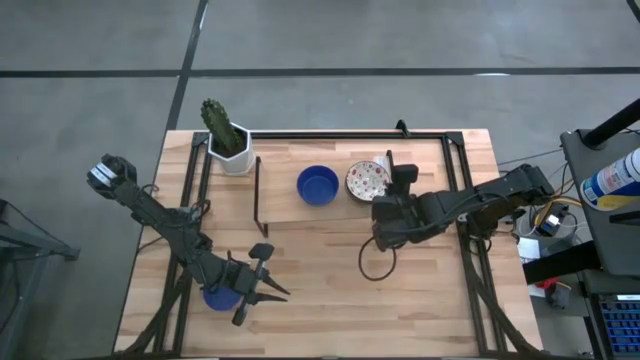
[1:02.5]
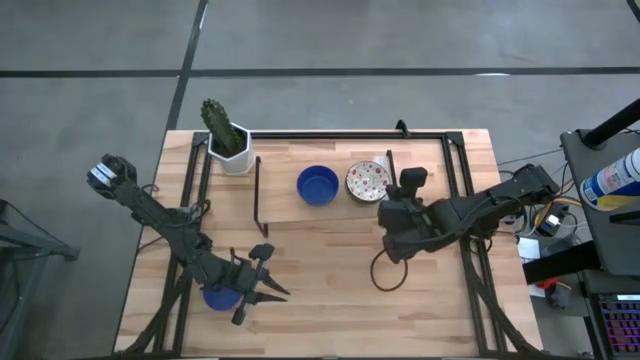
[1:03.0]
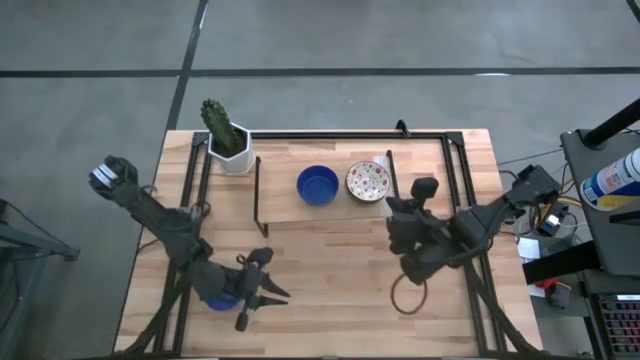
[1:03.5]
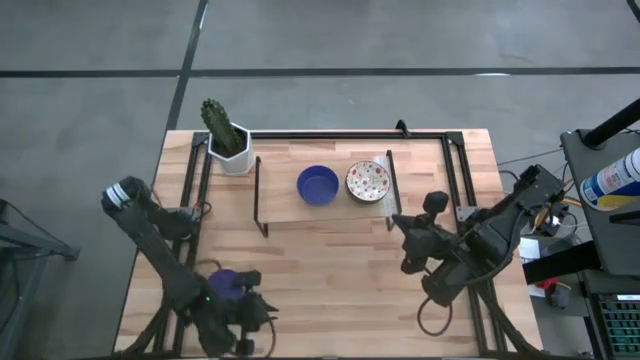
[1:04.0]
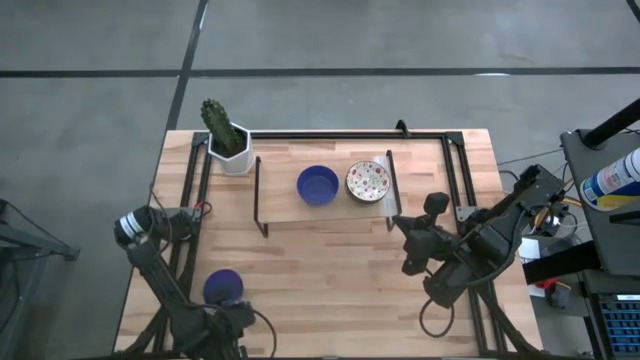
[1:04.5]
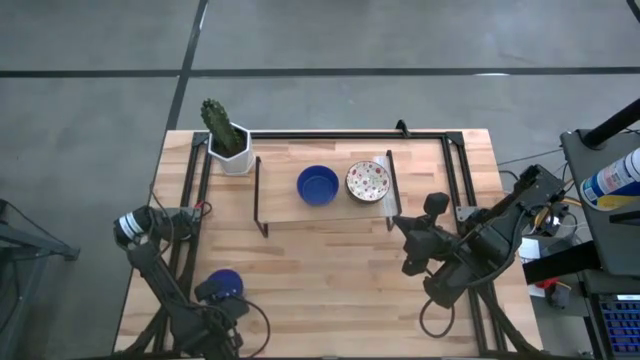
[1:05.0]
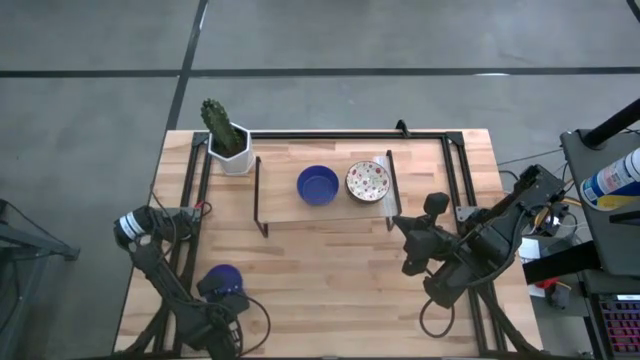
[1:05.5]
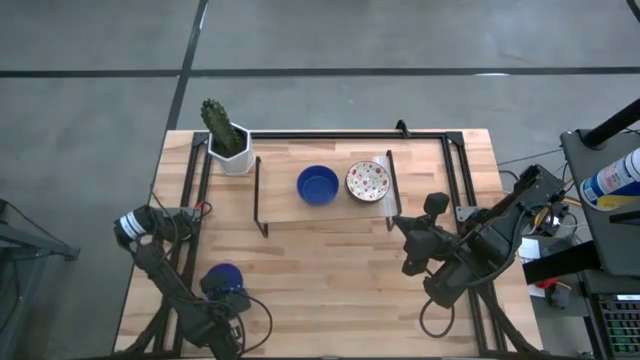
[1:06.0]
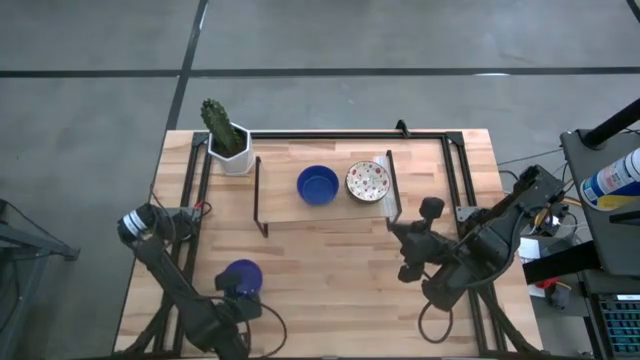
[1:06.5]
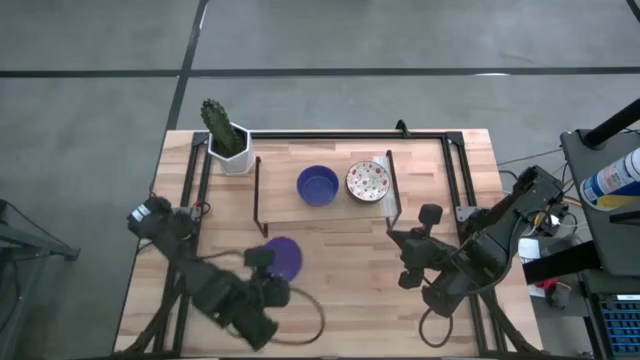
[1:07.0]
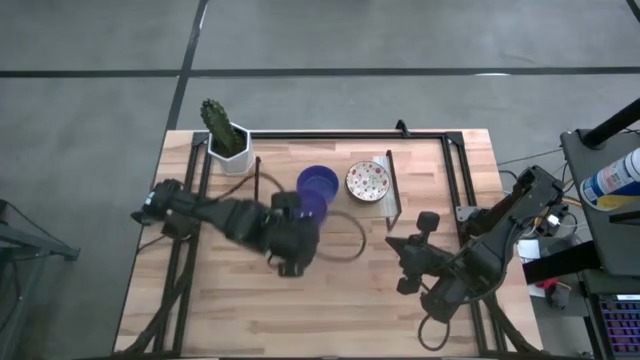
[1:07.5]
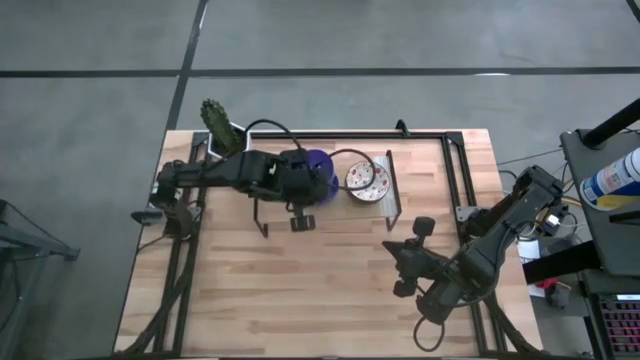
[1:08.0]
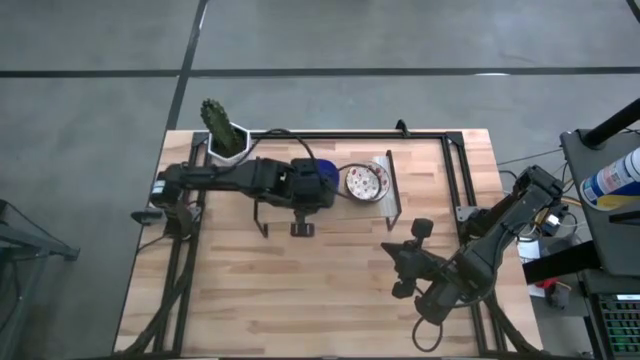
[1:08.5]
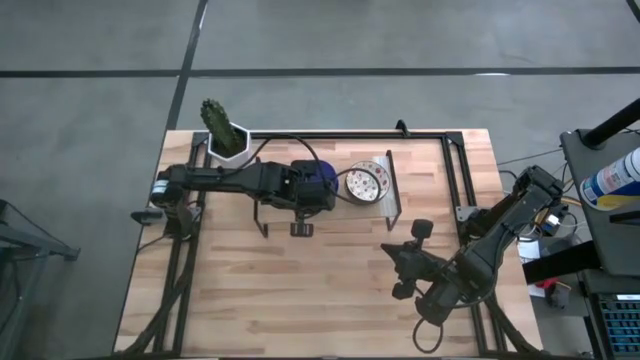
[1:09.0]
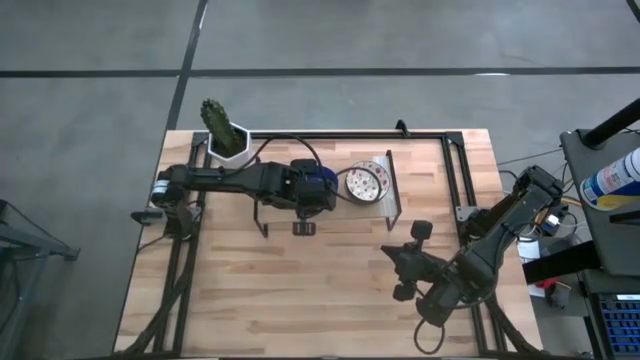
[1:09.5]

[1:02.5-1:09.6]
Task: Pick & Place Mini bowls
Stack the blue bowl on the stacked blue bowl on the shelf

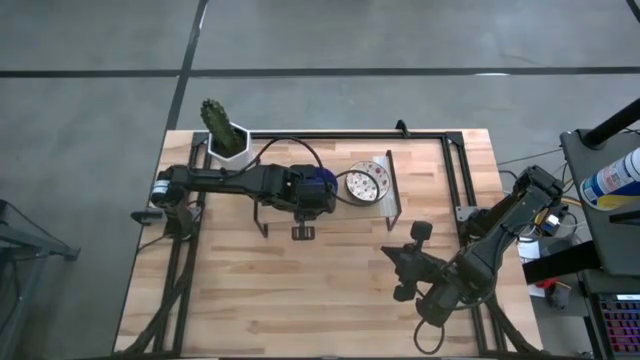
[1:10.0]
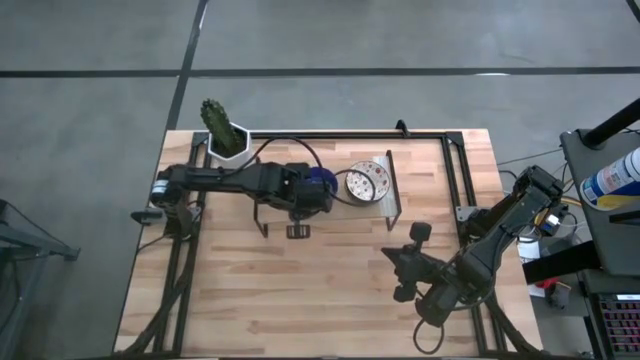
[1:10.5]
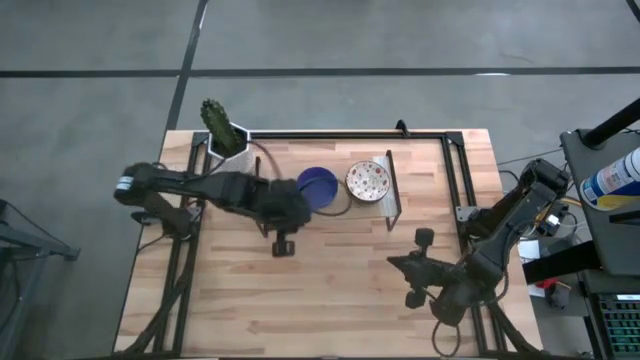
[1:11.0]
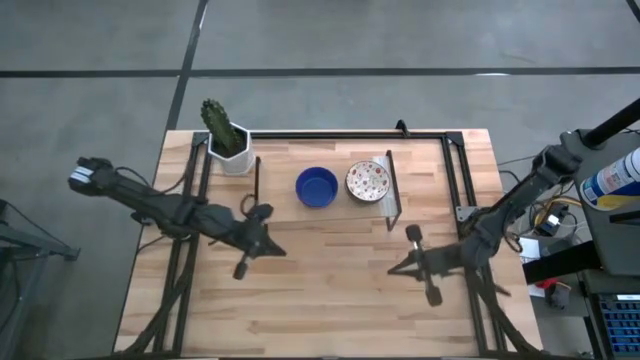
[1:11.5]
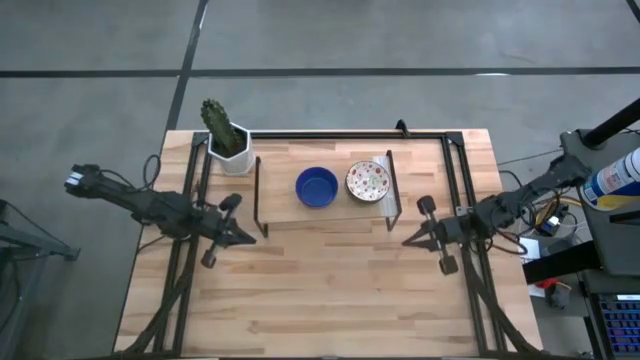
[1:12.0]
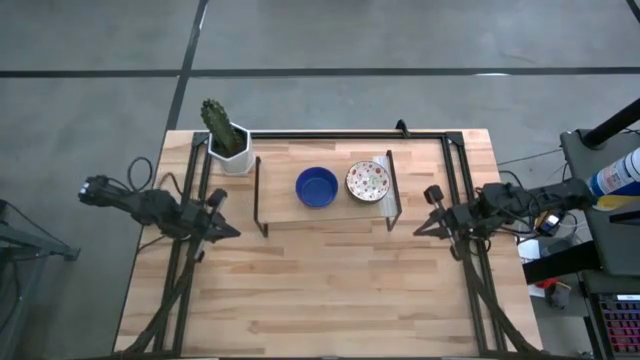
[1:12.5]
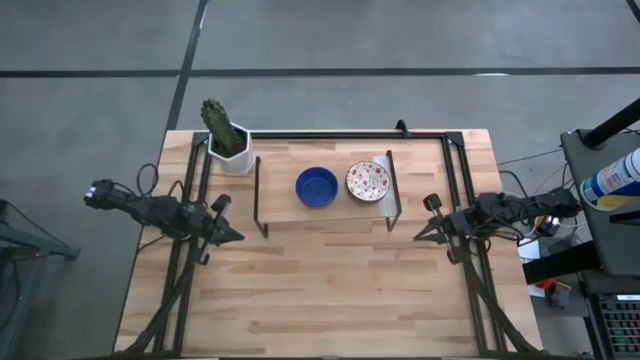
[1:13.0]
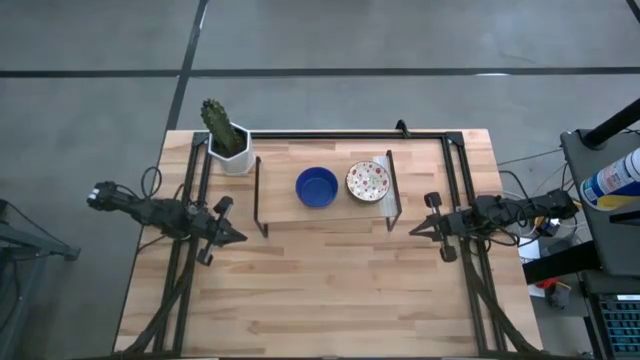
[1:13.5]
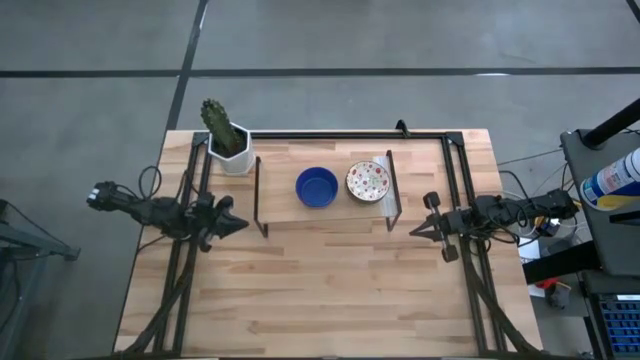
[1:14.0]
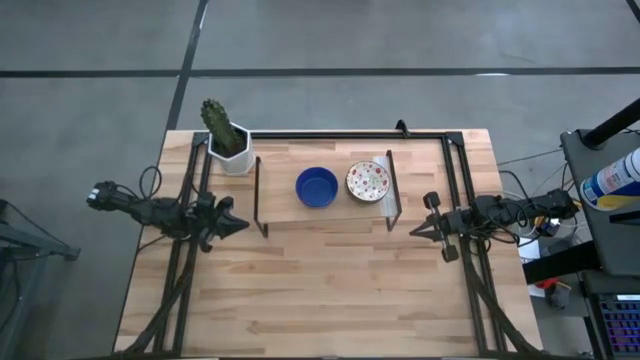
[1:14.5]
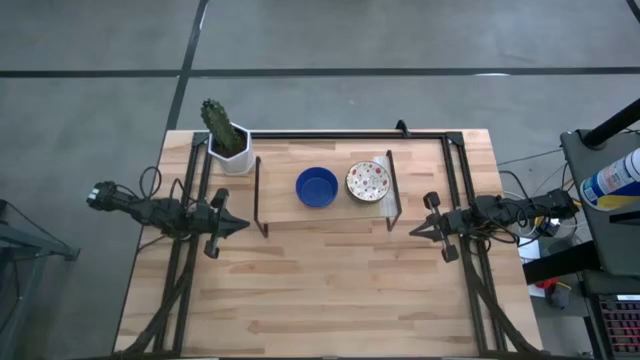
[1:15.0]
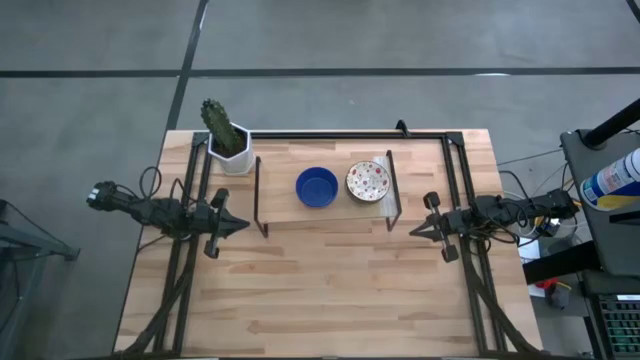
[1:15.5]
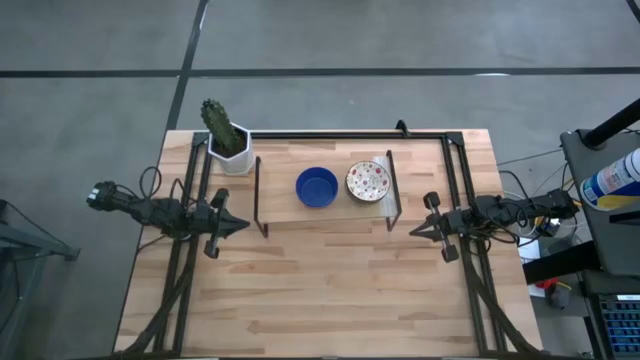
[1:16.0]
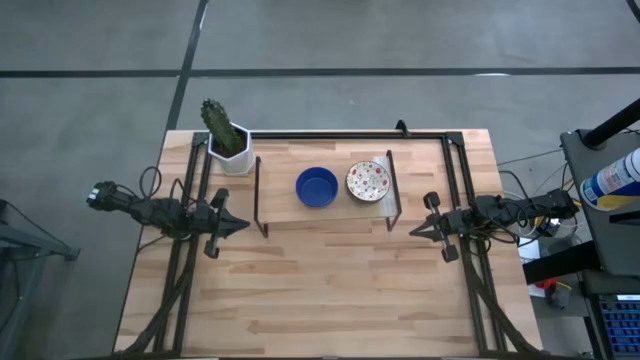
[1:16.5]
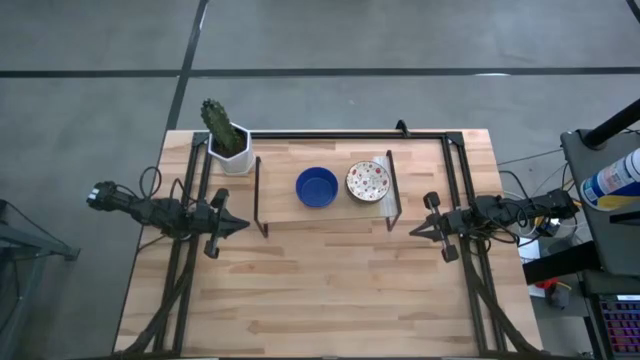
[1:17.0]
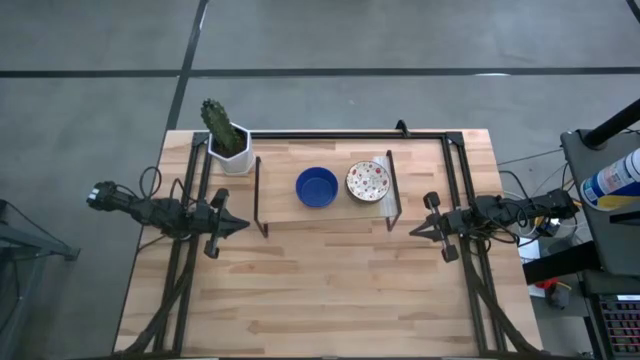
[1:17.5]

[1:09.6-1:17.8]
Return to Home Position

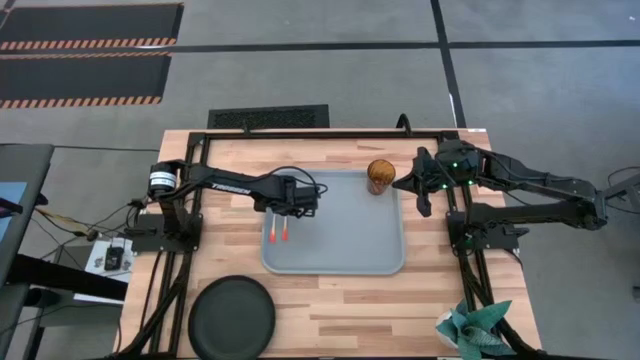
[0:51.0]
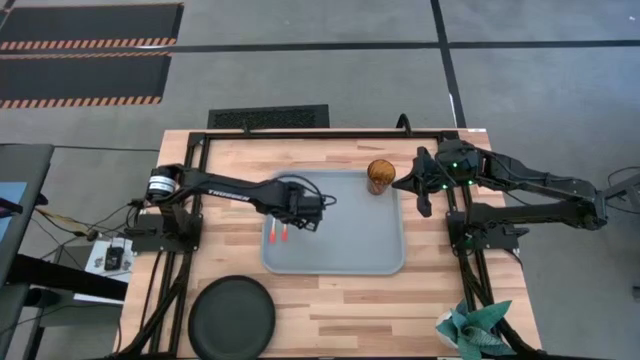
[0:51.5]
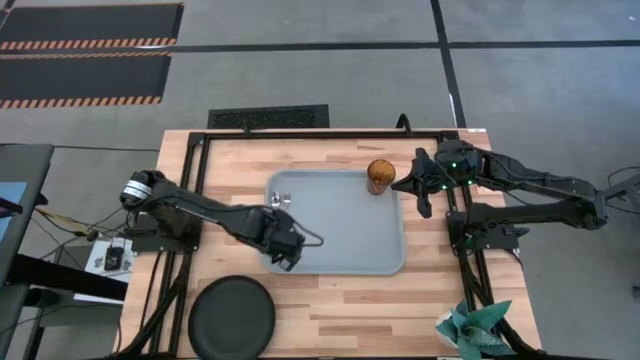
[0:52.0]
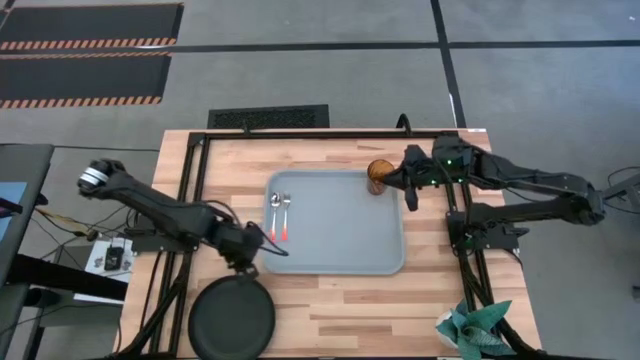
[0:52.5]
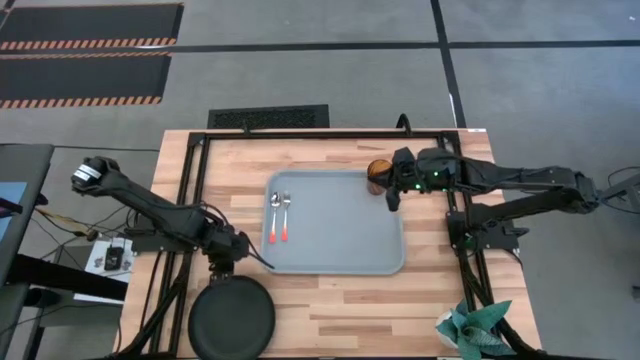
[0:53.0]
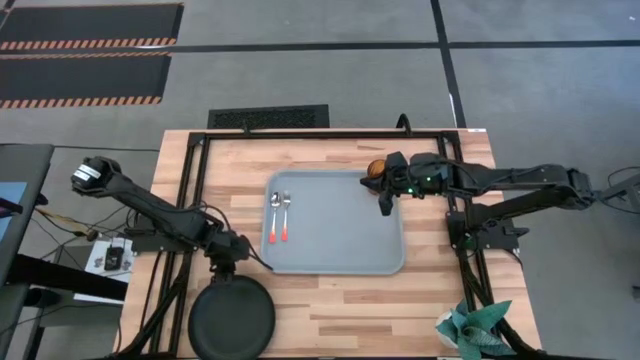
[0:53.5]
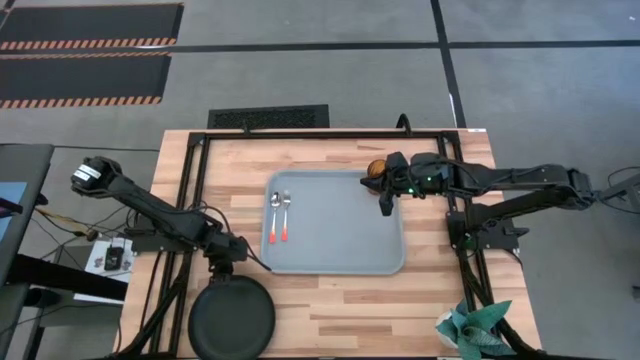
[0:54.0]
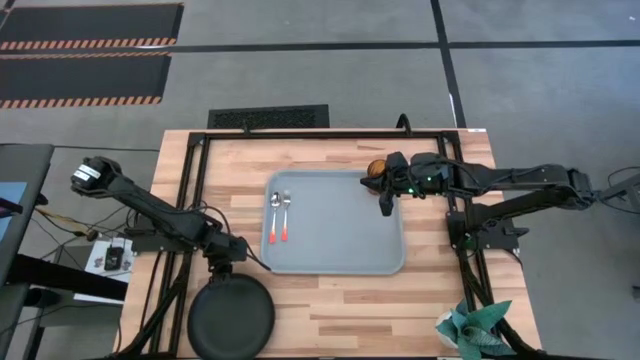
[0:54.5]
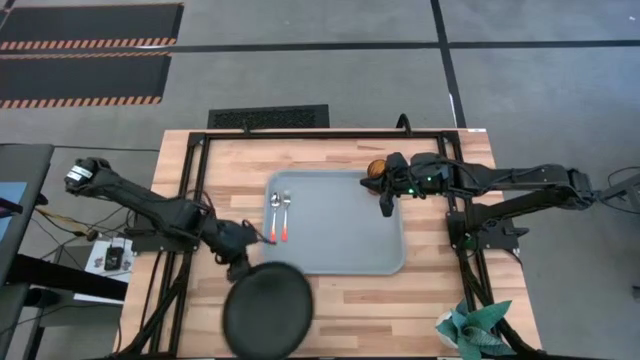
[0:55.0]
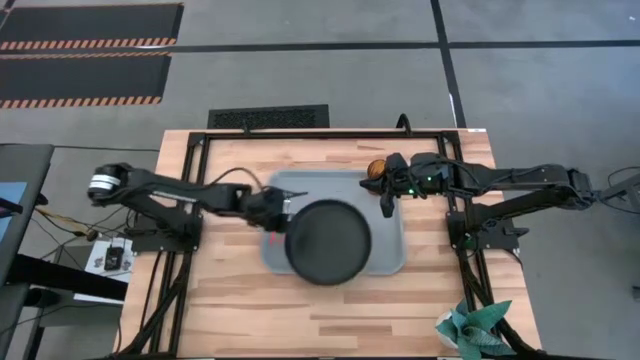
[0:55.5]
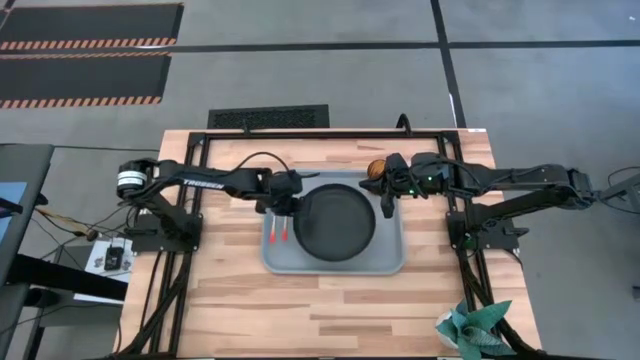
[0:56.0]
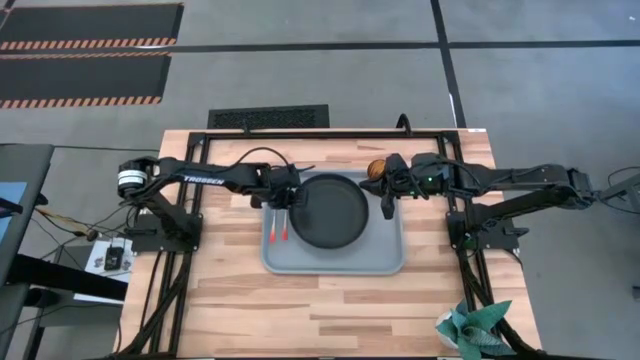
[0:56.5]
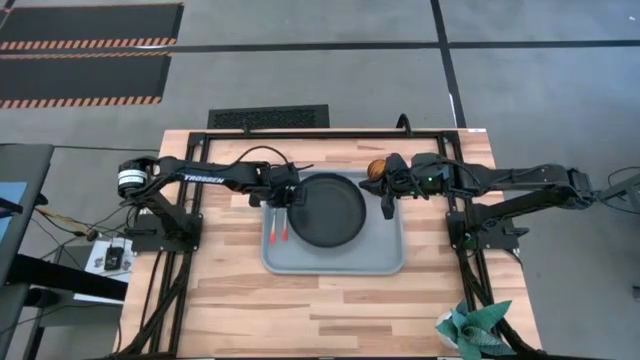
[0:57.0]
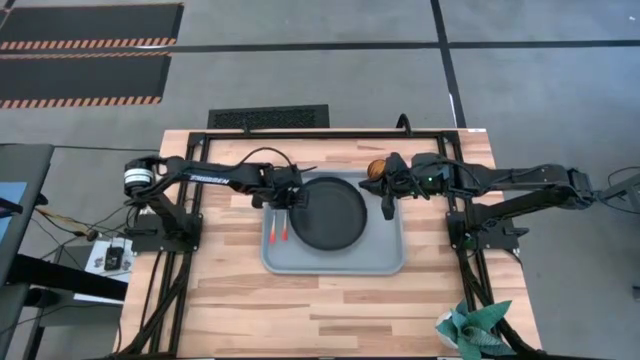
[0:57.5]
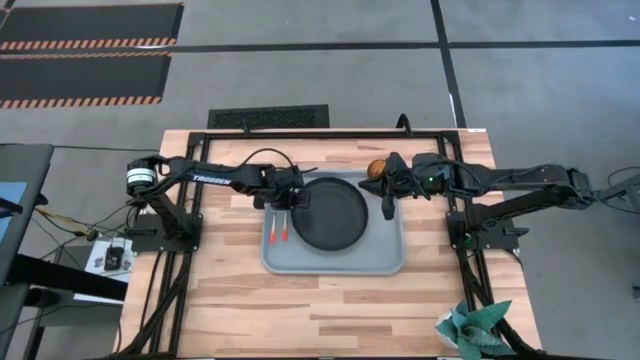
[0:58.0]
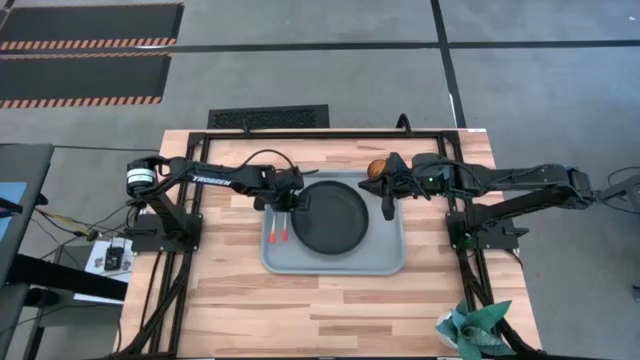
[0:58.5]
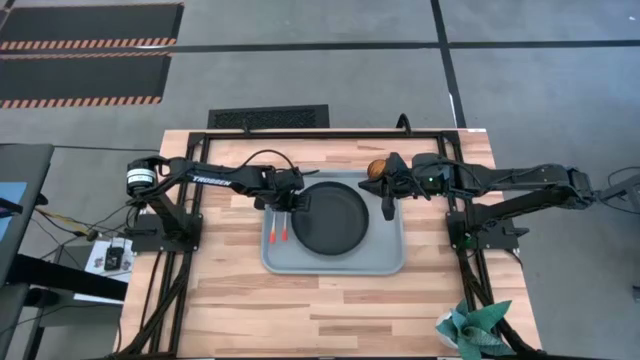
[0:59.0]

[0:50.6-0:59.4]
Task: Pick and place plate/cup/fork/spoon on tray
Put the black plate on the gray serving tray to the right of the orange fork
